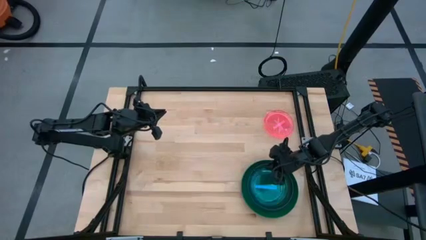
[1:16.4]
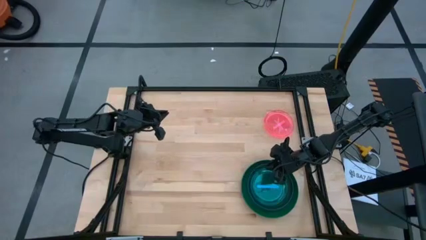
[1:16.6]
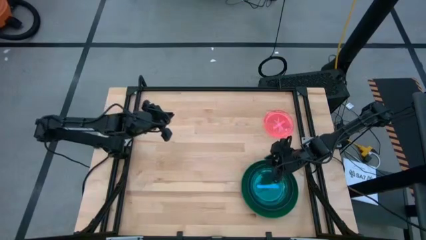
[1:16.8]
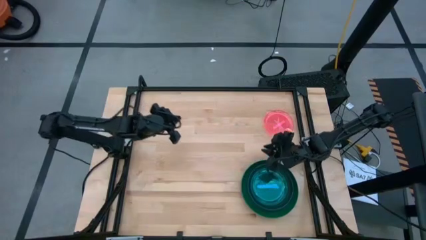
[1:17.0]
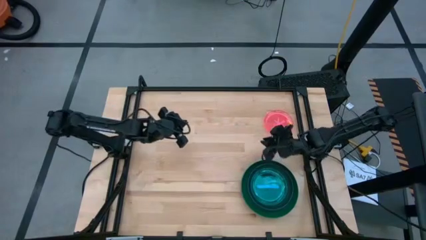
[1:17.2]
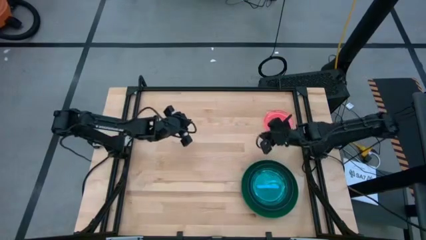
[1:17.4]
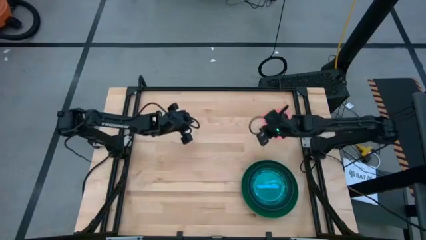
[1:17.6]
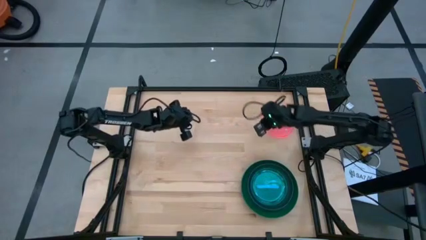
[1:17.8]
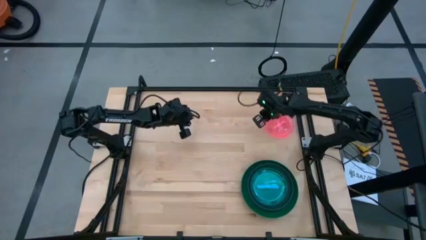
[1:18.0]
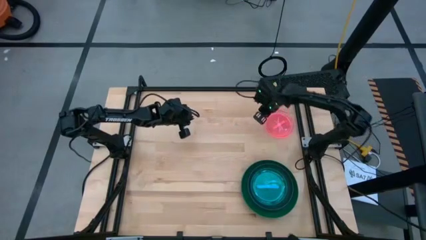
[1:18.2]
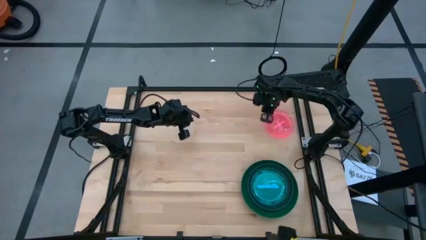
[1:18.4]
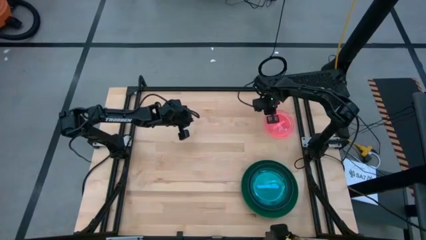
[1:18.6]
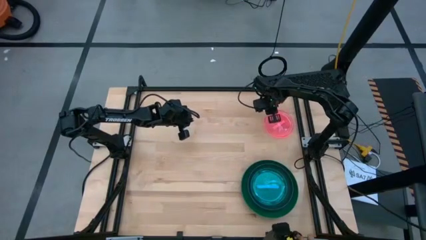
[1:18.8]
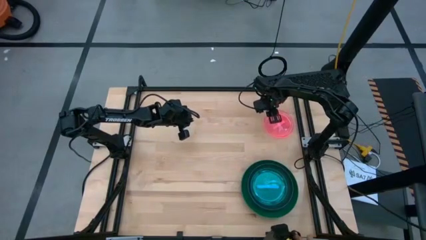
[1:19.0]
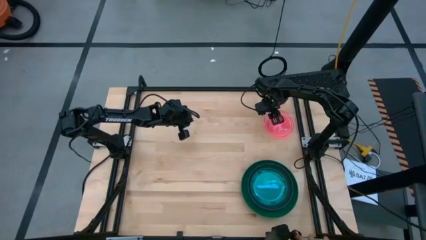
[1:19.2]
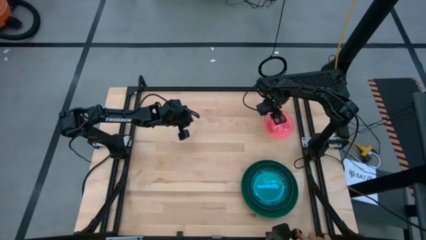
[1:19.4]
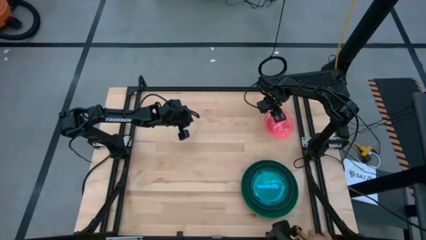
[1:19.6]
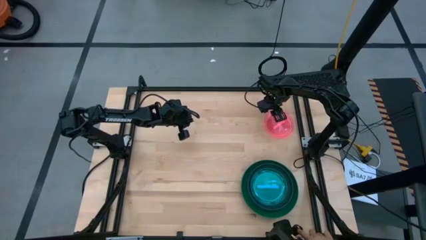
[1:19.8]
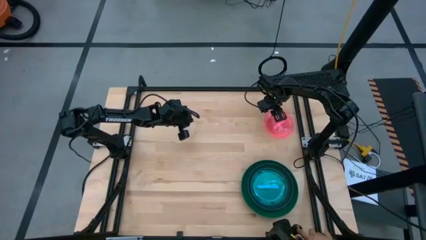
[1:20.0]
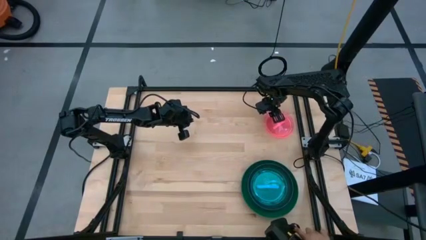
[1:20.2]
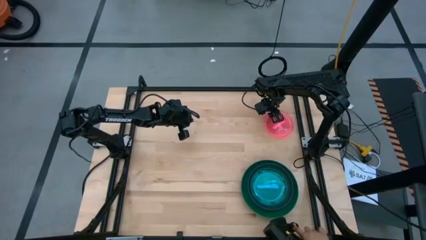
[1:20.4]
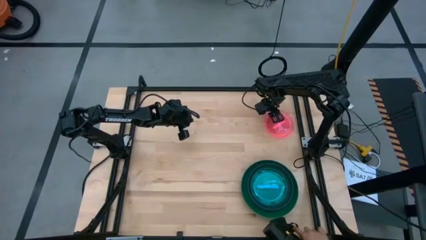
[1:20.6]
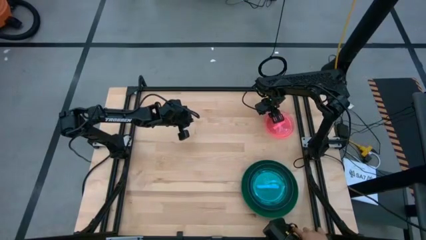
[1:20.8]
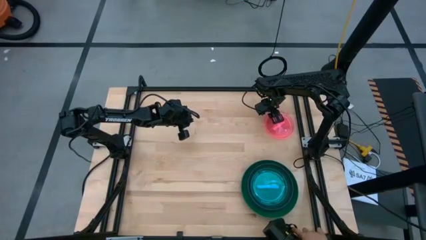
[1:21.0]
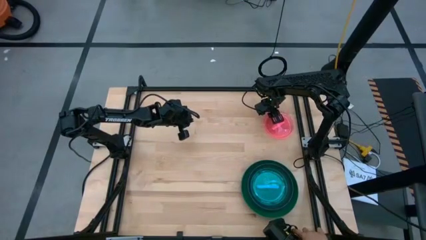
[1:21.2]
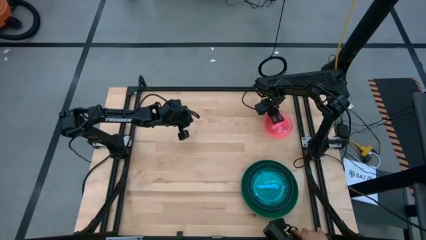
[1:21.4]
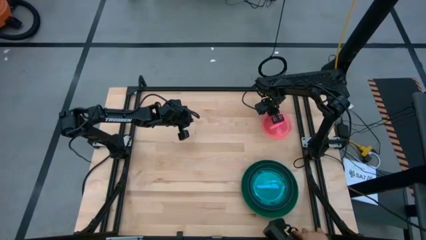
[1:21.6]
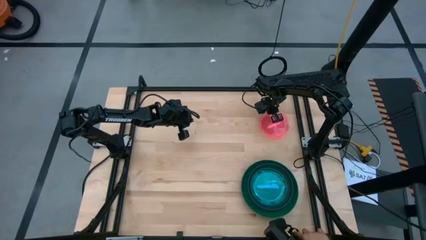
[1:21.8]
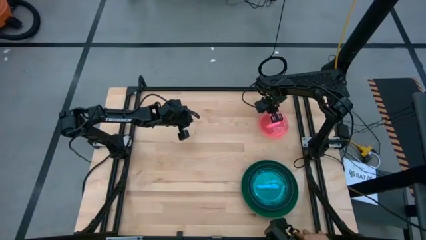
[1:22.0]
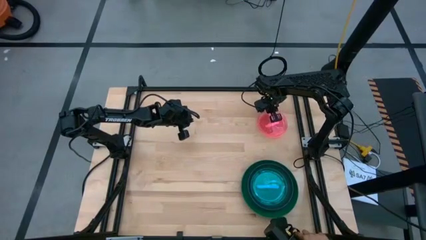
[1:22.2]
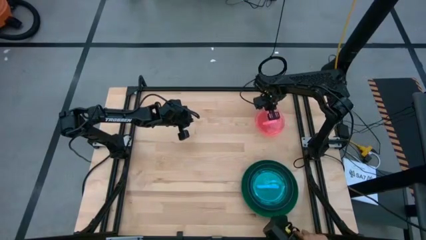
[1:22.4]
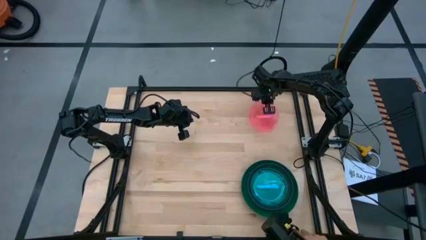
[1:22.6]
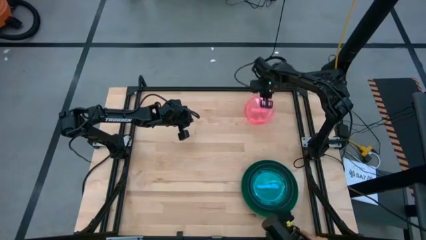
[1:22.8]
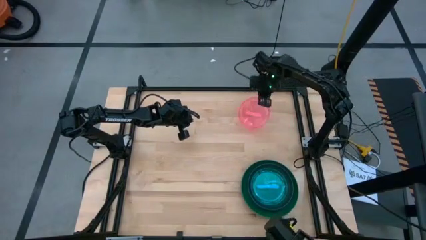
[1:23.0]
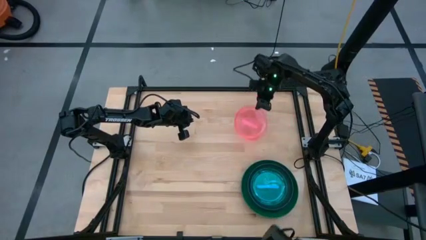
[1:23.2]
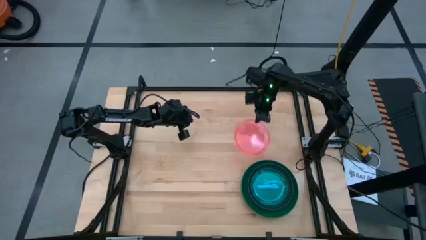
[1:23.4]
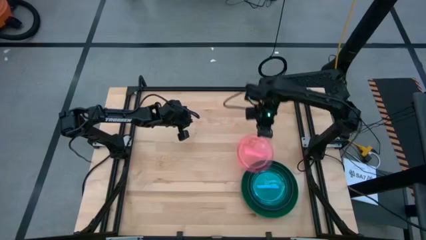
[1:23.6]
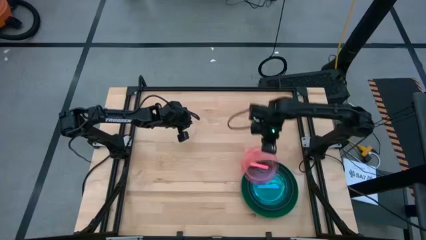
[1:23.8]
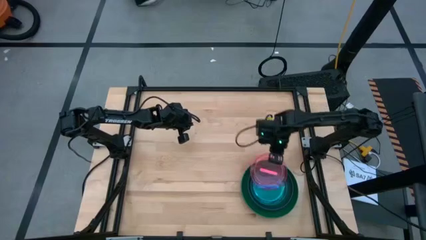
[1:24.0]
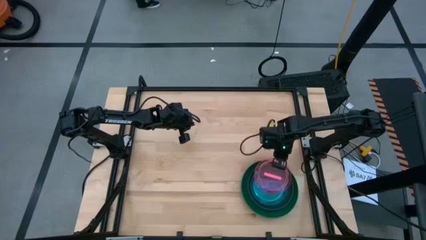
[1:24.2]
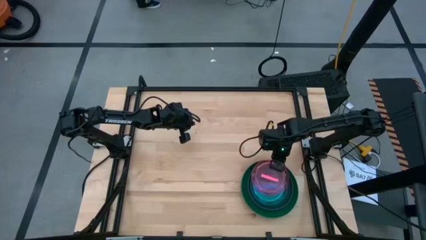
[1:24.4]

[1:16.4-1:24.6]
Task: Stack plastic plates
Stack the pink plate on top of the blue plate

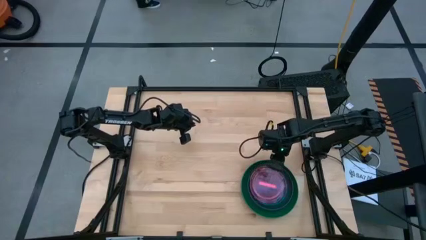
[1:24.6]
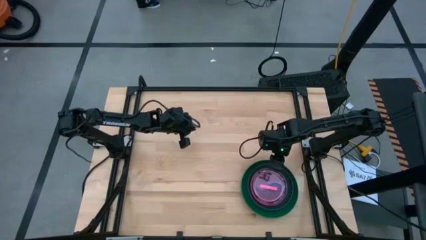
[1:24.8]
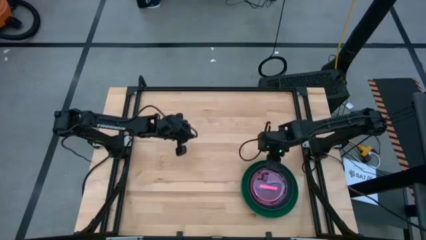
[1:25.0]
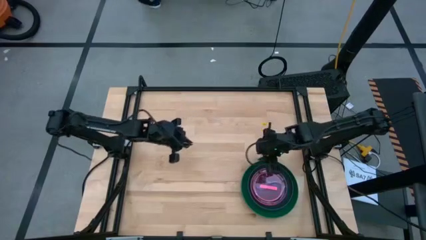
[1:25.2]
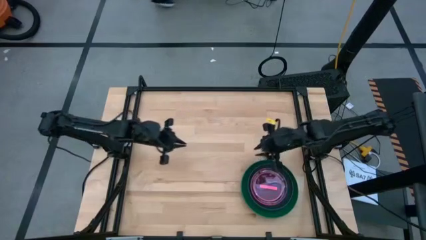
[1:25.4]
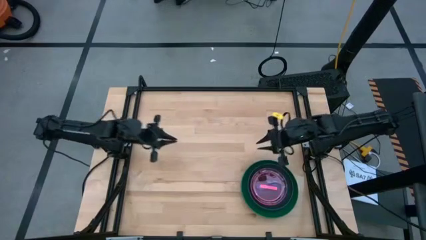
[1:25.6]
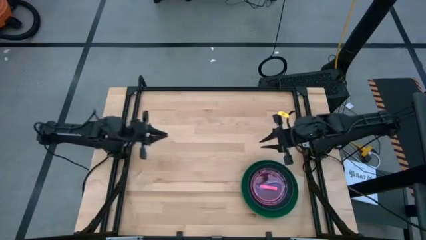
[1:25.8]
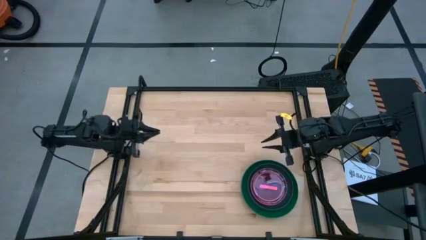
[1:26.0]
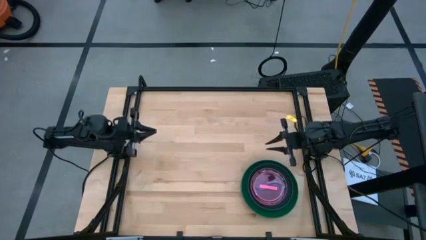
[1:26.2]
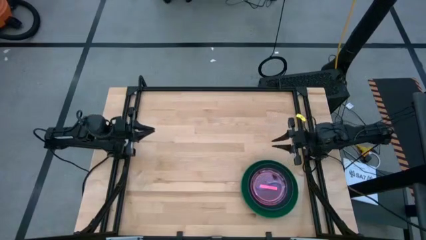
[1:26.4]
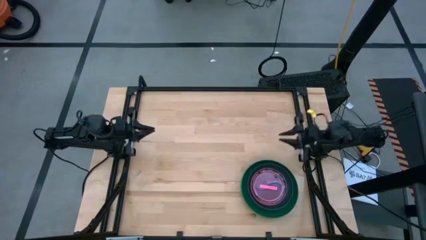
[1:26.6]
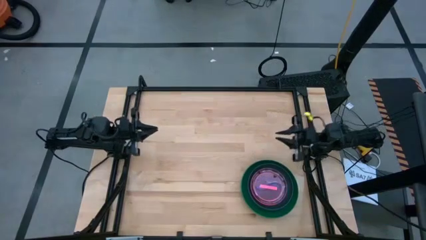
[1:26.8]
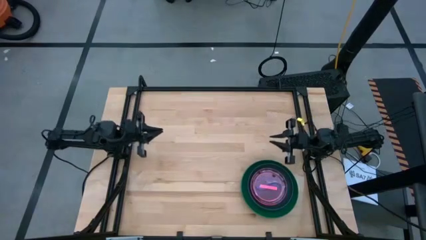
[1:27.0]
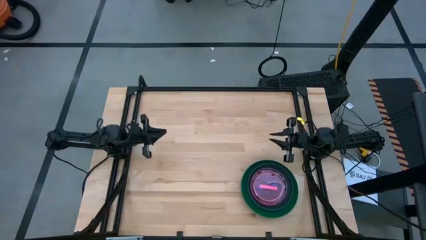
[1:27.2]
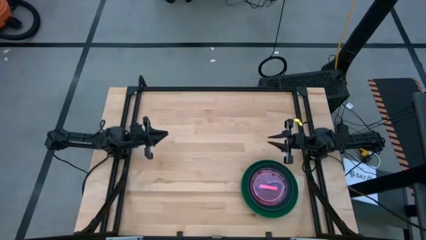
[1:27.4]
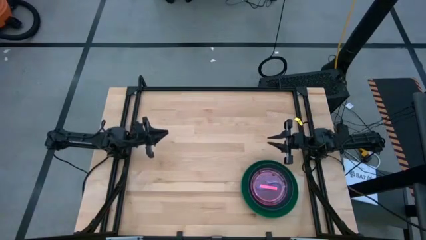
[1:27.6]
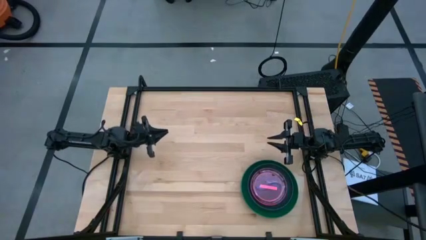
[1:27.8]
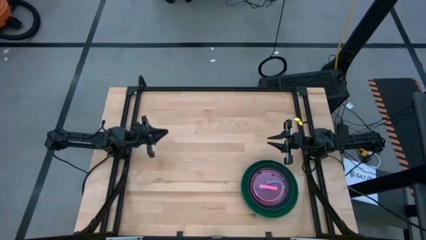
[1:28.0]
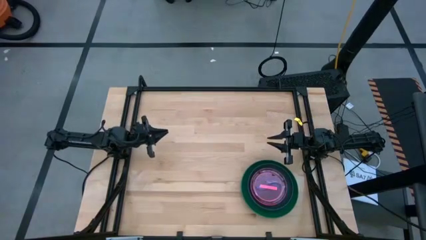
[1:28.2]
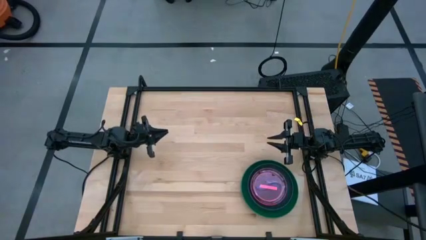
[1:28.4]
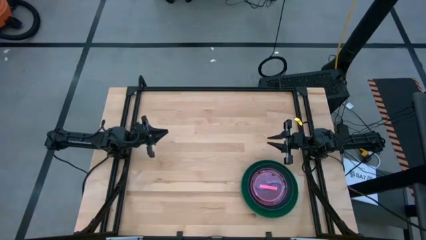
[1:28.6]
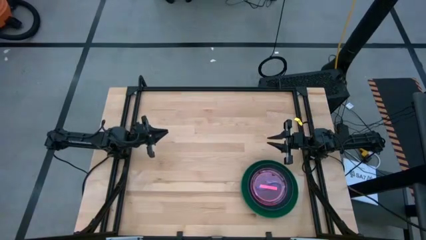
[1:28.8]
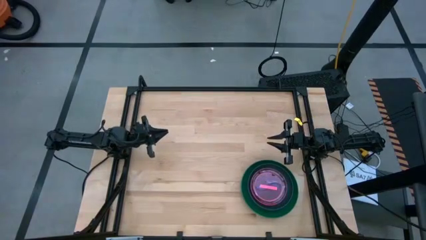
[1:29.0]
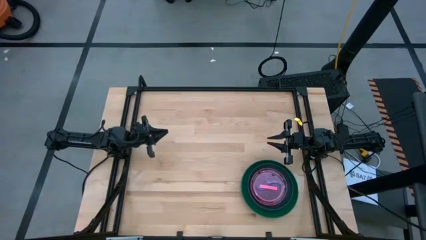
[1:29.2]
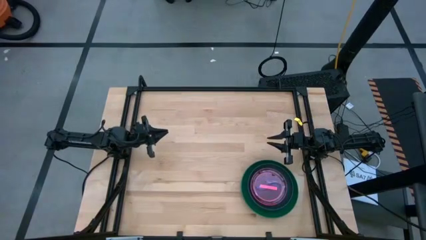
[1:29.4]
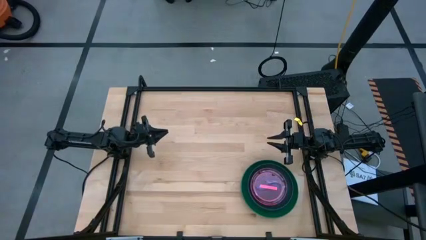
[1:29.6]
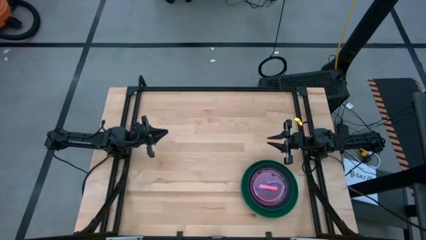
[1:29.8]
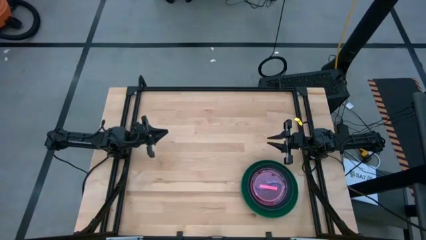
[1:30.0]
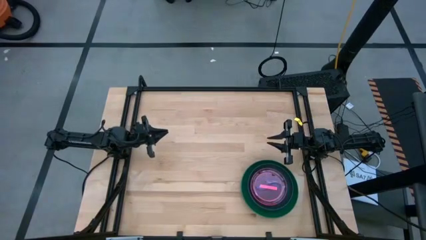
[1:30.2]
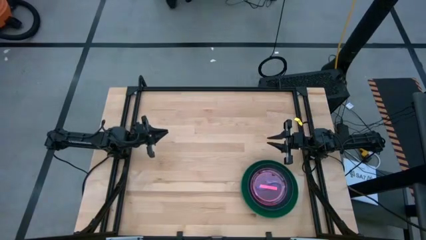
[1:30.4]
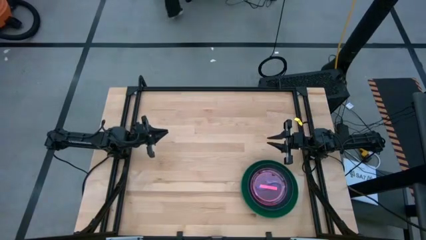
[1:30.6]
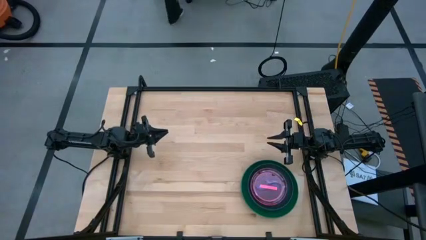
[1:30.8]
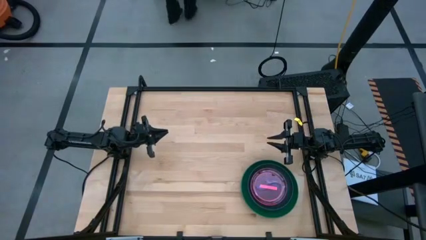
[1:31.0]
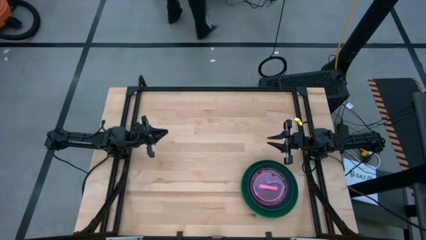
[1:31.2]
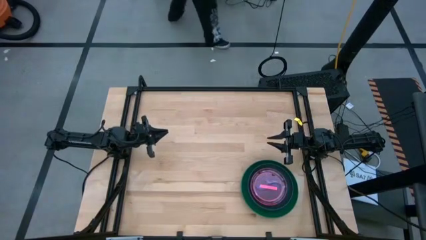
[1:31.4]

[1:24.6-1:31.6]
Return to Home Position

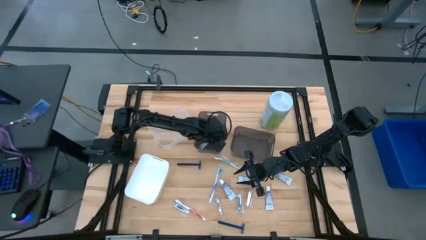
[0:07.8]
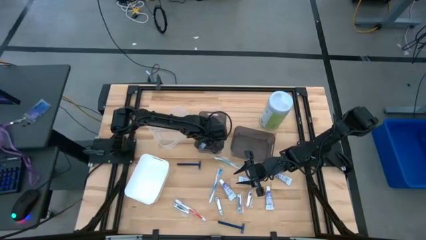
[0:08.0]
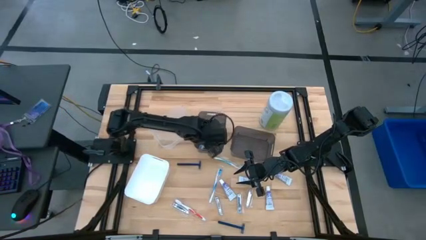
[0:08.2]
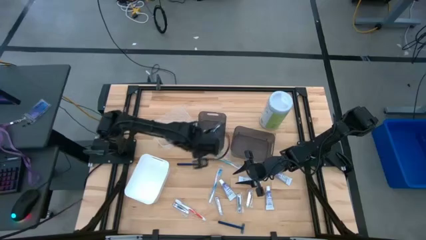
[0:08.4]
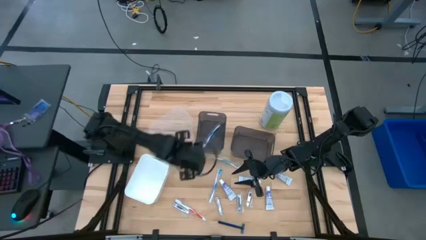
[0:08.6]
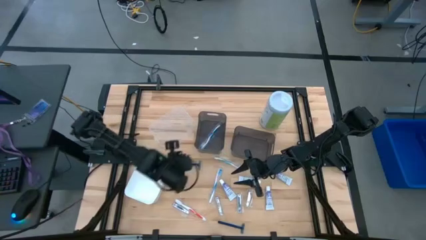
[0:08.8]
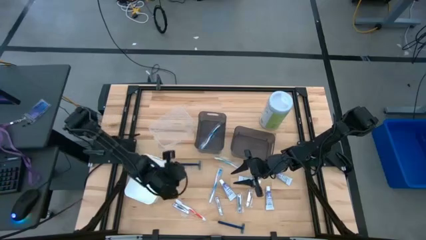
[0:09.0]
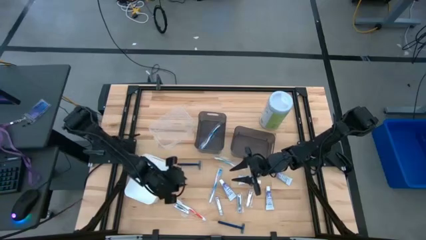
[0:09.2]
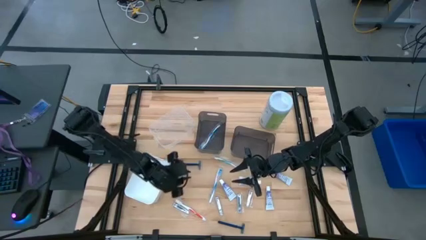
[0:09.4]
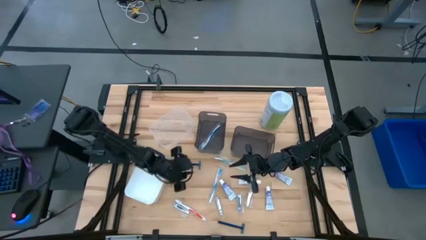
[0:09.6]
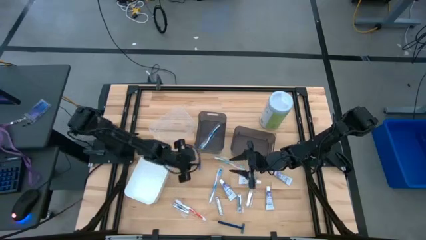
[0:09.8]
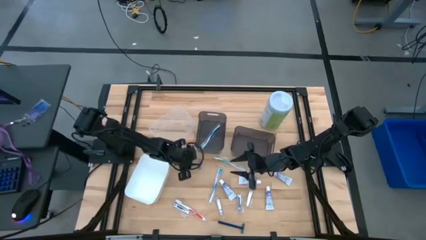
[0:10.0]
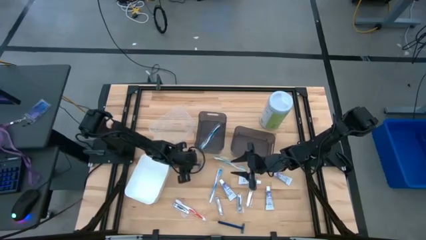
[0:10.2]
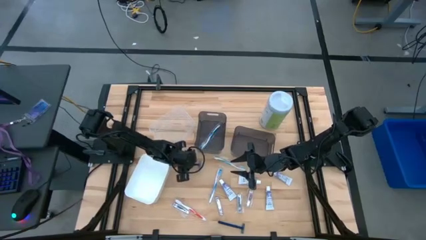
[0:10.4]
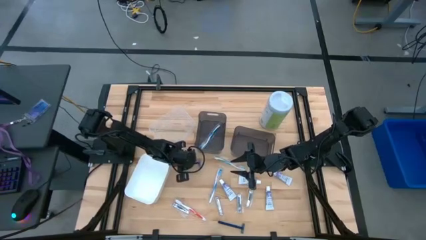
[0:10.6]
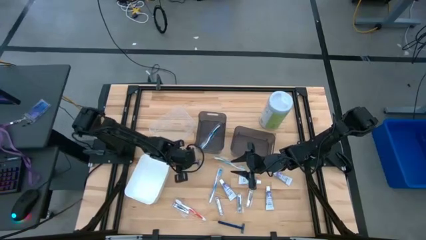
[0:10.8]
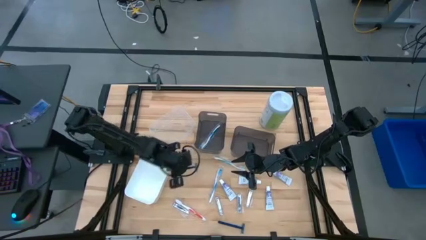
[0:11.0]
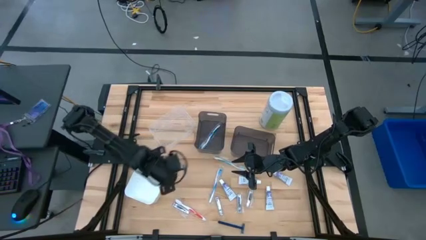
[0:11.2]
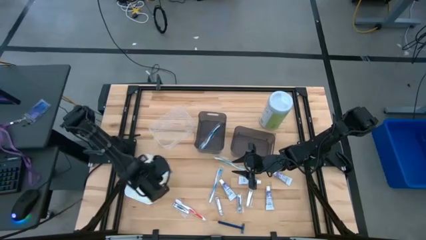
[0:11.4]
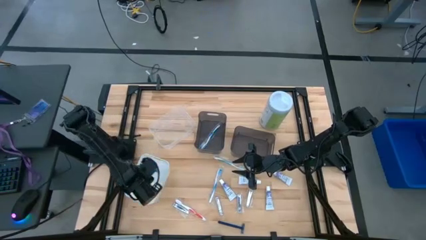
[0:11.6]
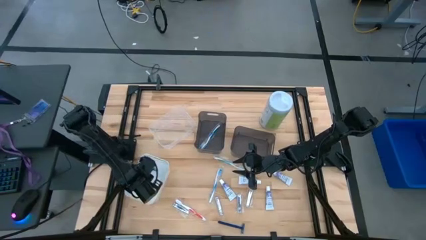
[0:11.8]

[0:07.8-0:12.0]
Task: Pick & Place Travel size toiletries
Put the blue razor into the white bin
